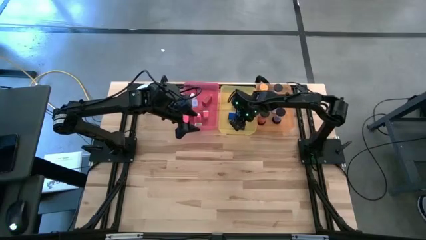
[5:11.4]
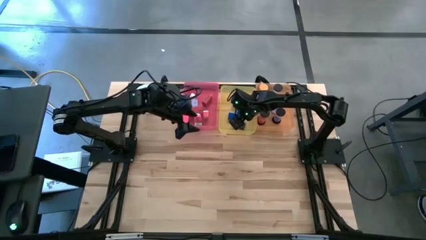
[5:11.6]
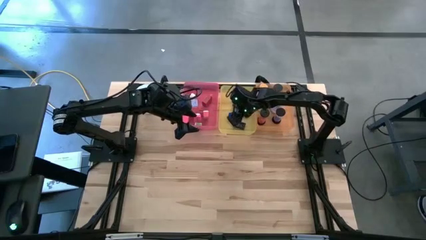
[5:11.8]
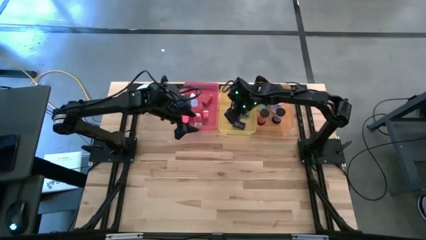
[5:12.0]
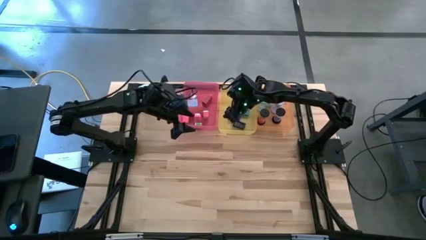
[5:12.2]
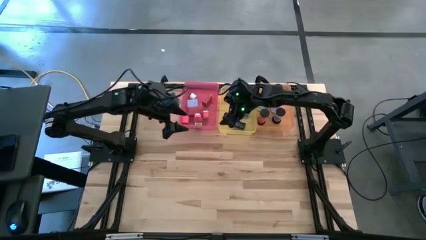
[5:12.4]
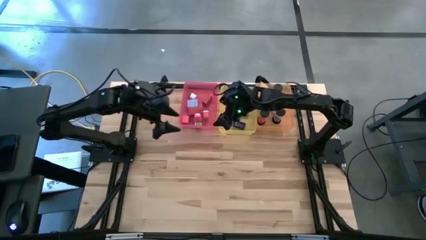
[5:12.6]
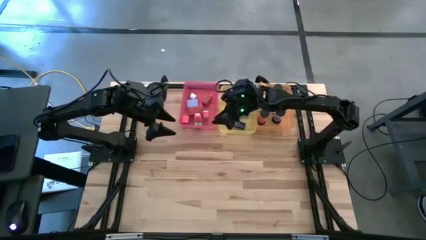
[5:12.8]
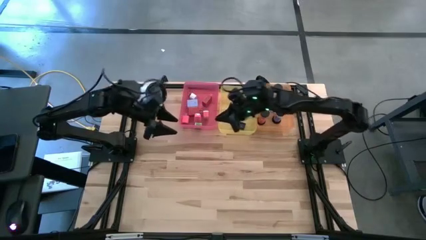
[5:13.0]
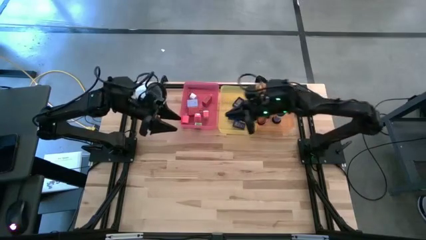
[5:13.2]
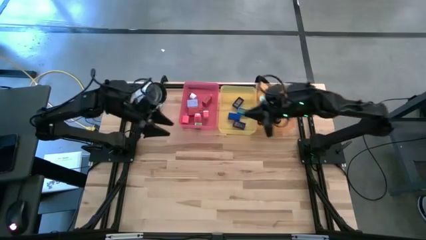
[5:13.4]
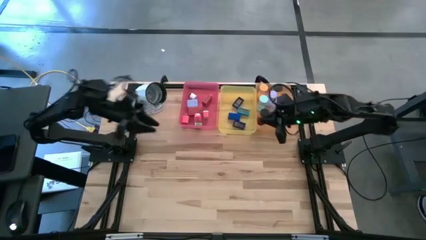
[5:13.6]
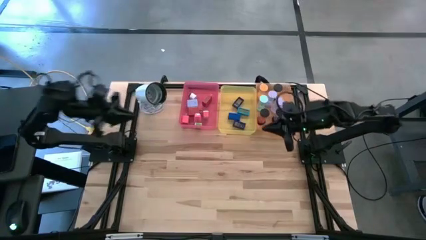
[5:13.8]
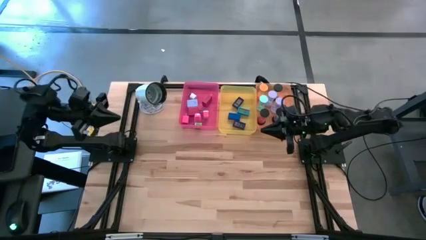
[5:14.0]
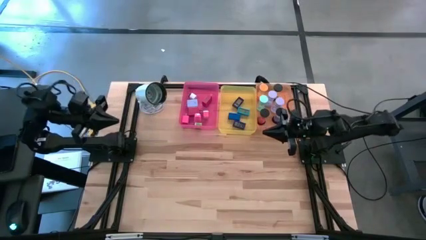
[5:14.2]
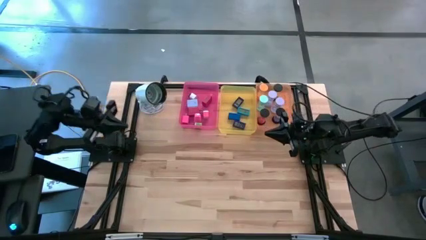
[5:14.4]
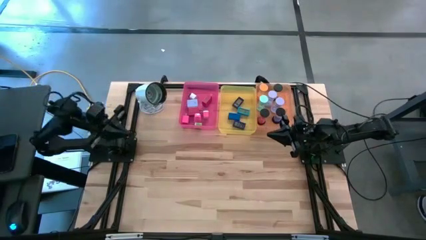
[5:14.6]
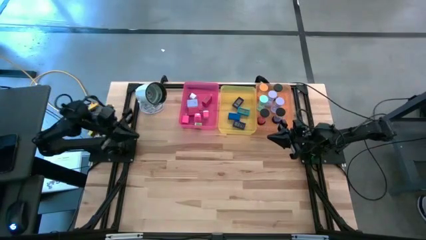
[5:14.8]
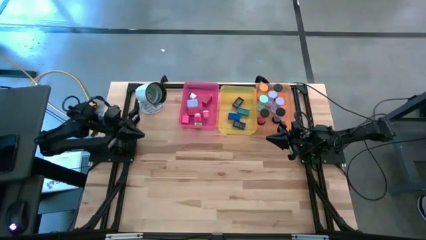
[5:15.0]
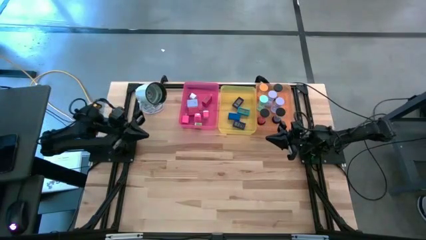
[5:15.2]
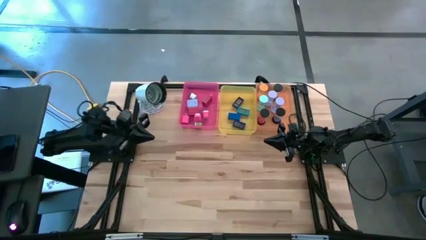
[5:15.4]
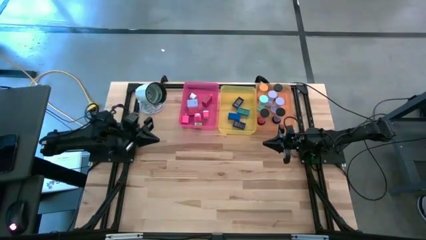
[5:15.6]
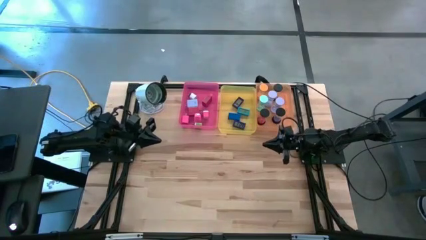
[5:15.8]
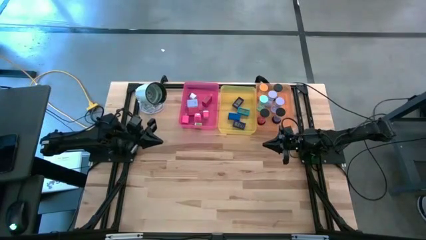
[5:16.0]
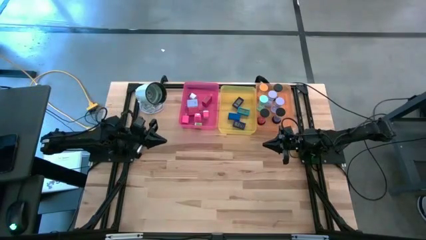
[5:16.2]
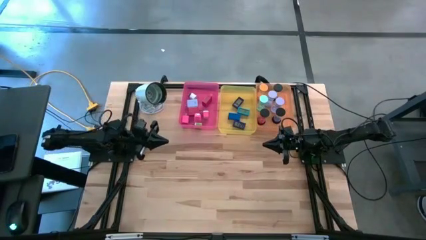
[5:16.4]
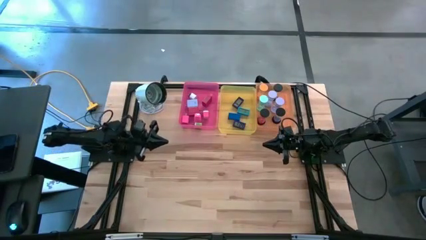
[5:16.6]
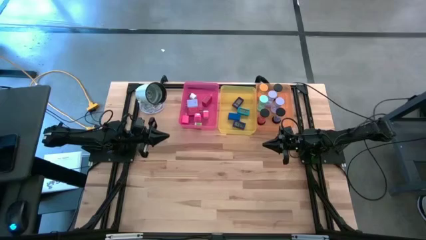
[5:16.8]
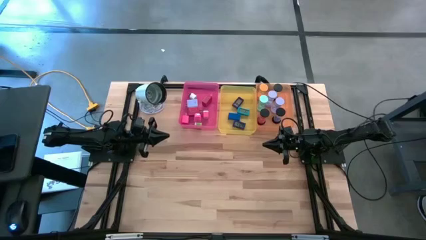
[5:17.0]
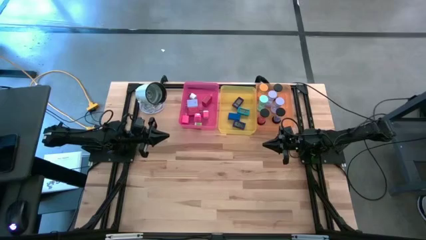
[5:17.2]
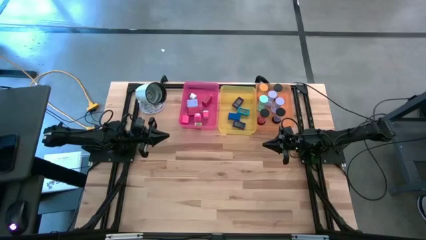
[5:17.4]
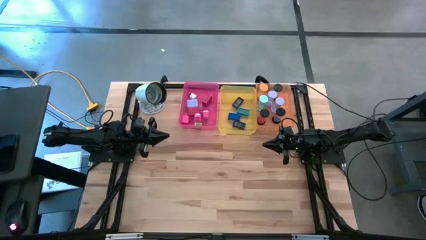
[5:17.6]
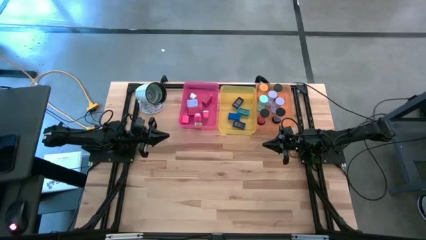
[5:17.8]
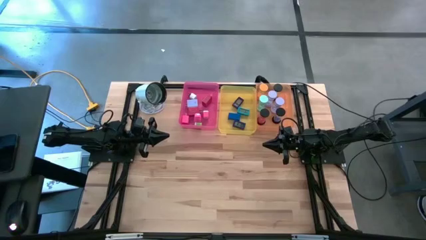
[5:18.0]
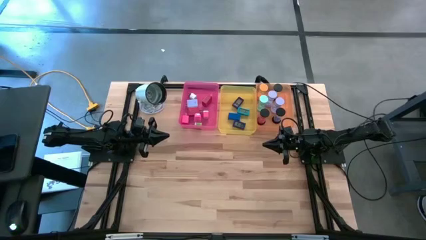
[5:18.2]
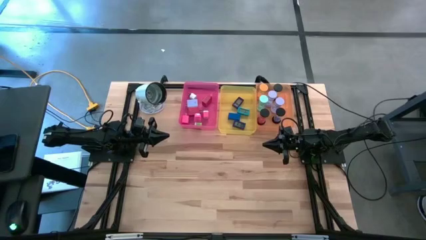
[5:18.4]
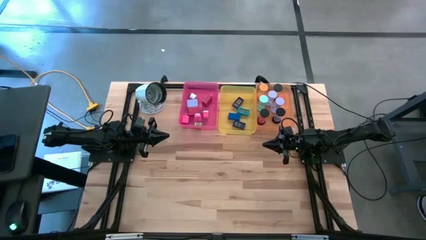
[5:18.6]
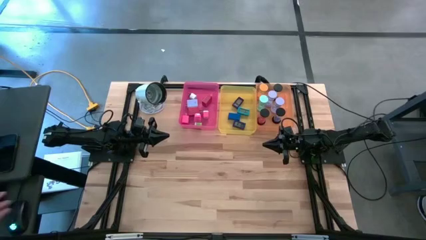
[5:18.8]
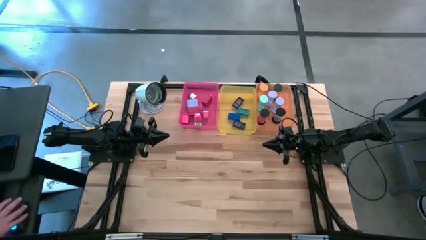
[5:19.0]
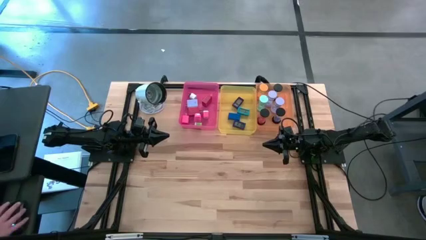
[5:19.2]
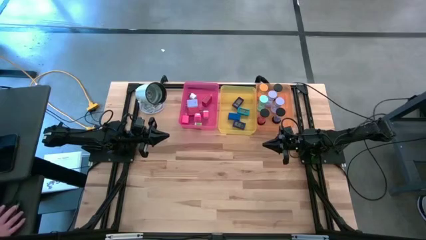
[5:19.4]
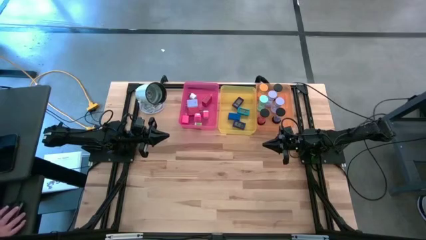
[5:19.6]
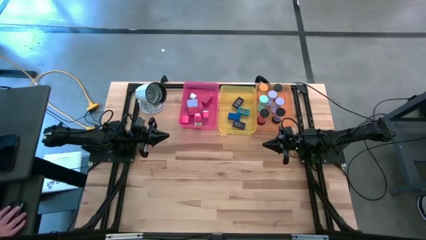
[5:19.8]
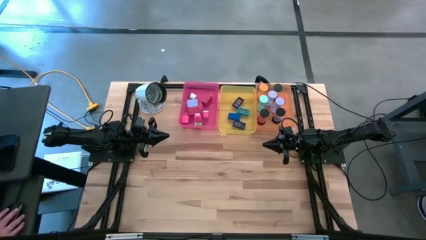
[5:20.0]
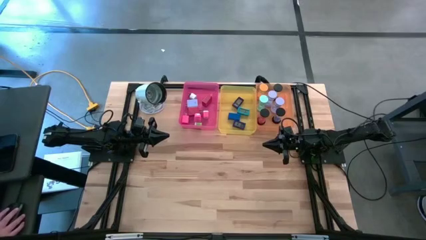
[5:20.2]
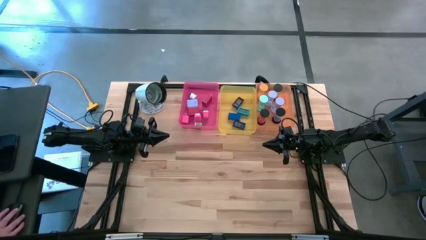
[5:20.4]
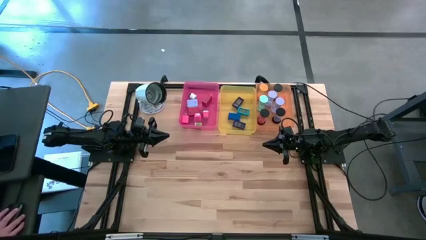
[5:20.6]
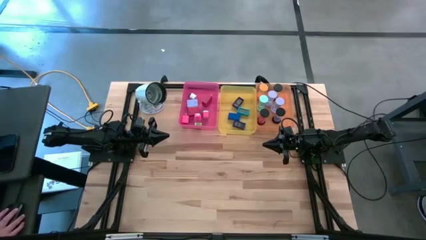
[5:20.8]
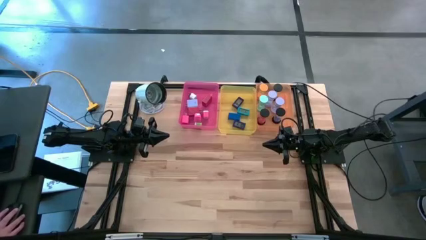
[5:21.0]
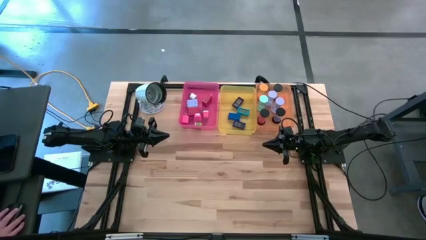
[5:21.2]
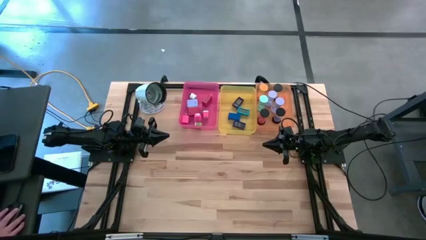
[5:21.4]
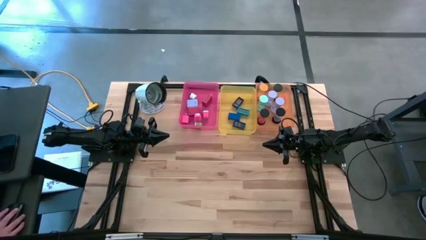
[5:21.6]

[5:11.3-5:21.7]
Task: Pick & Place Office items
Return to Home Position

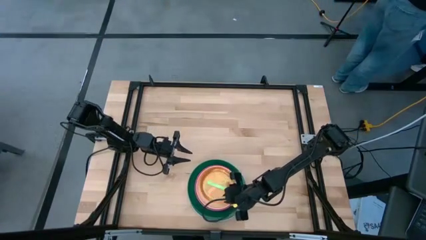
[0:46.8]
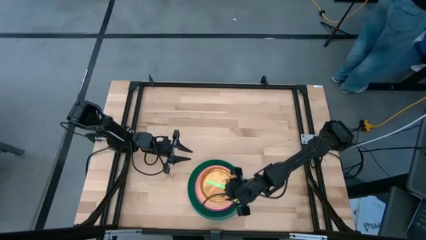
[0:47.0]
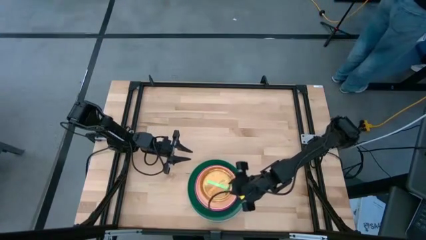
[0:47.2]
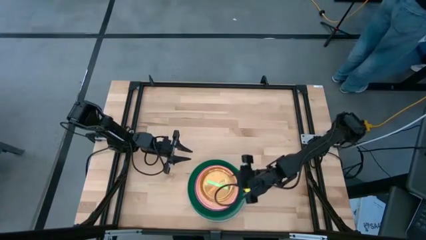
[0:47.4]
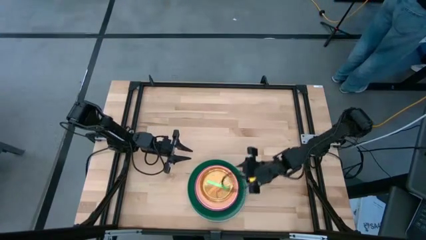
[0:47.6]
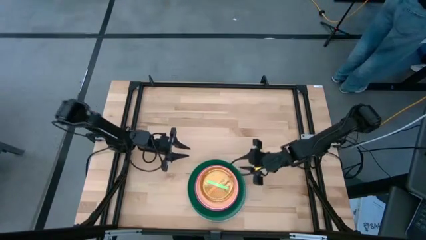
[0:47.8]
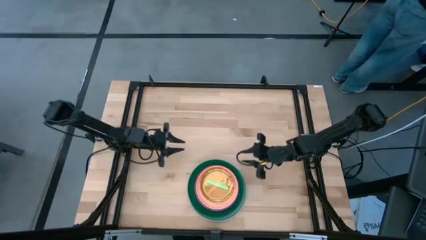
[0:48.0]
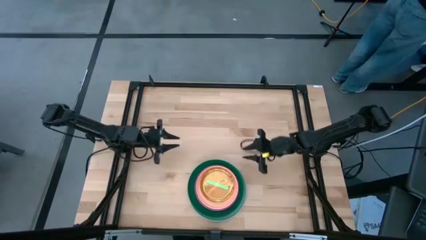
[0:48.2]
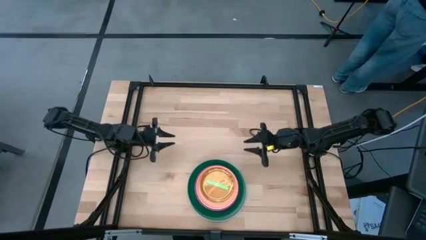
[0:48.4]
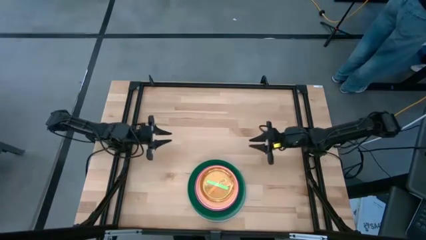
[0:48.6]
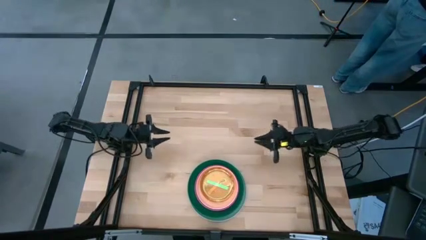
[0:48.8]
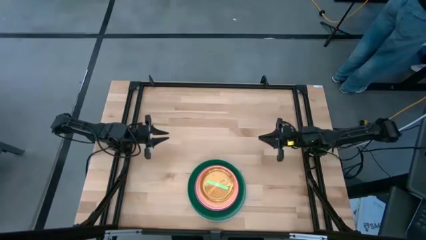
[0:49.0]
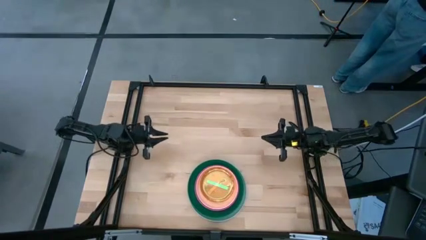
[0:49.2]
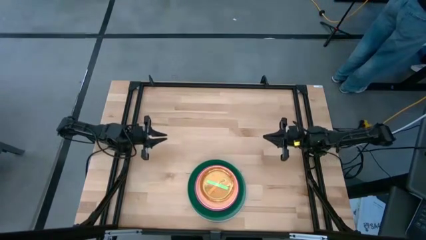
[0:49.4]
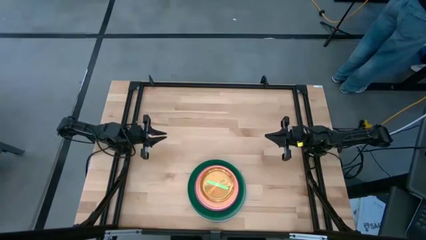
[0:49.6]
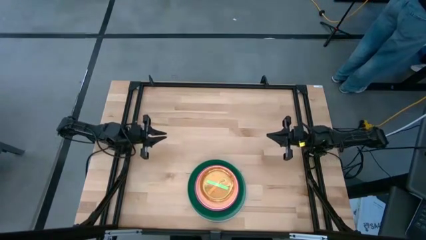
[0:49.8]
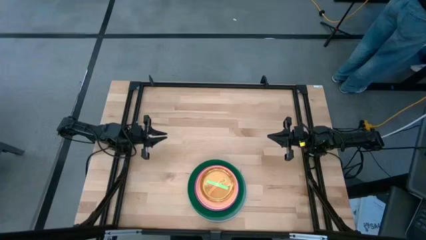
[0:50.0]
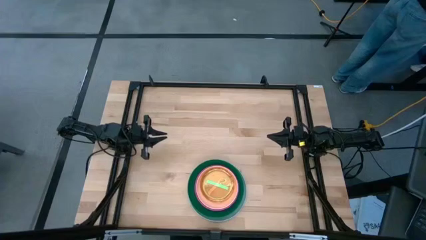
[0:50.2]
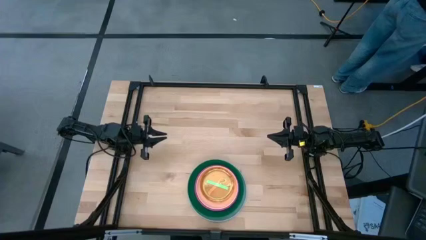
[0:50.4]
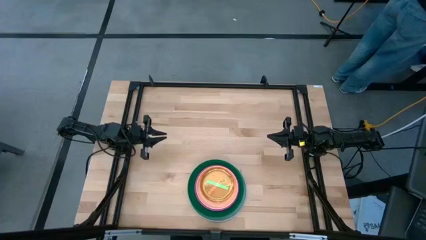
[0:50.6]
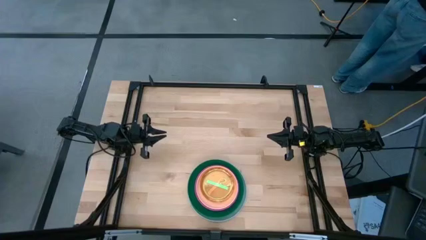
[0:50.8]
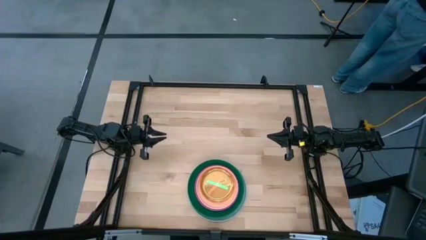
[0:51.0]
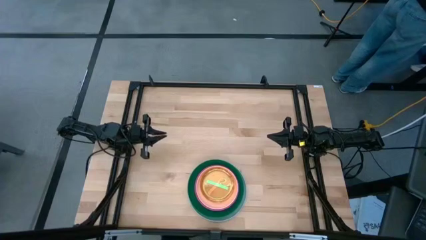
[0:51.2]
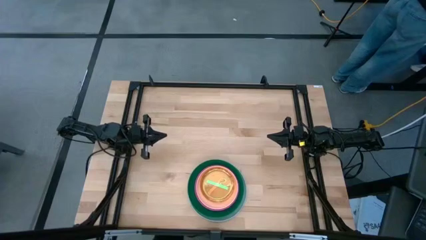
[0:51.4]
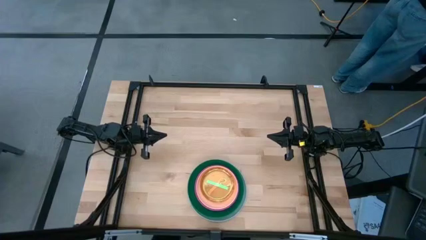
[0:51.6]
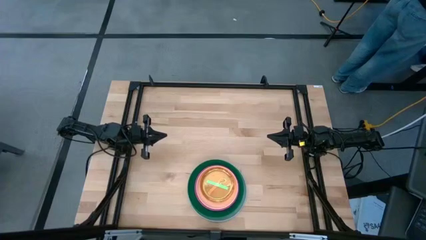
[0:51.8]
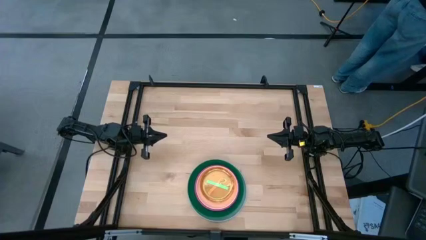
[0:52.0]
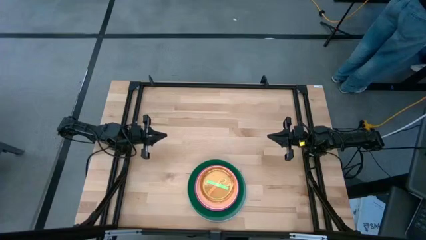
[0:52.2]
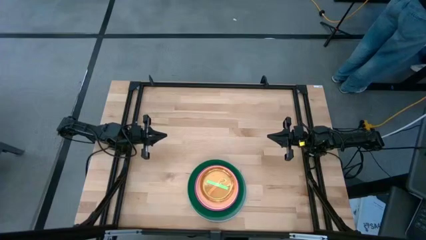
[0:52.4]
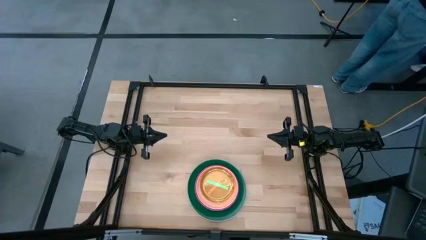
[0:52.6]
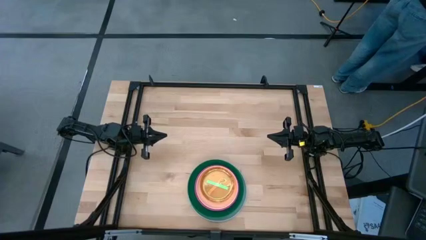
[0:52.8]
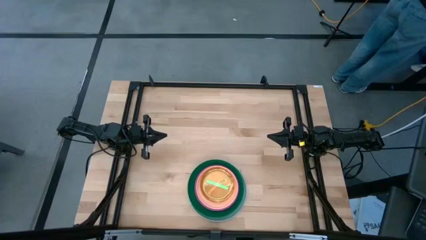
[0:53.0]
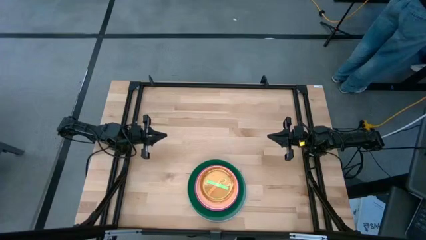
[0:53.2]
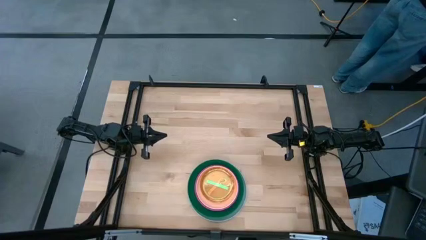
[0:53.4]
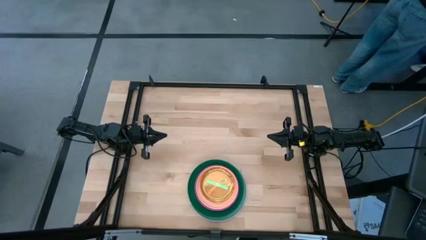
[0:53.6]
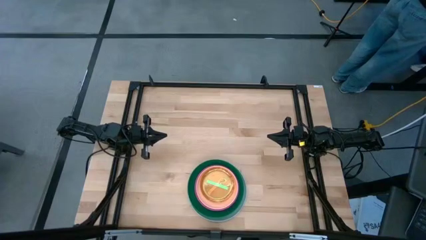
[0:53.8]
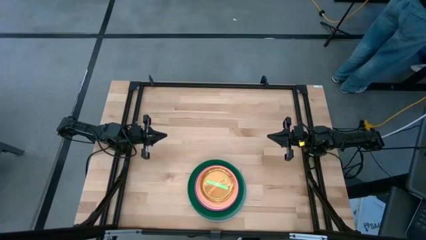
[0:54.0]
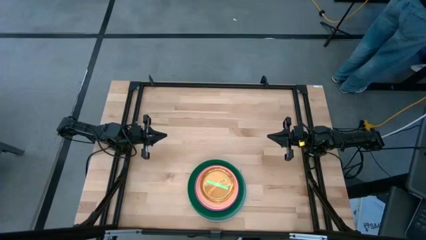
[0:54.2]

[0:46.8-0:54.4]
Task: Stack plastic plates
Return to Home Position
